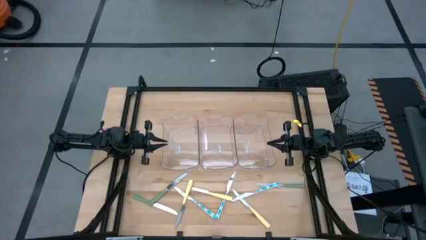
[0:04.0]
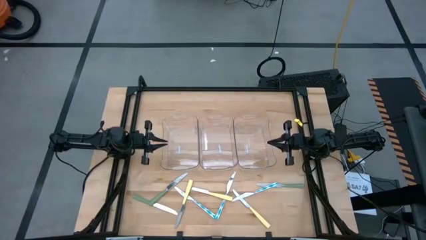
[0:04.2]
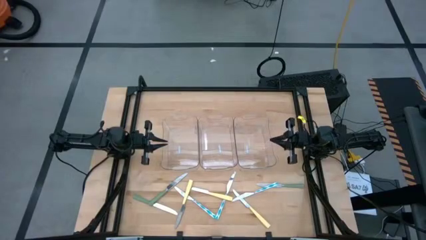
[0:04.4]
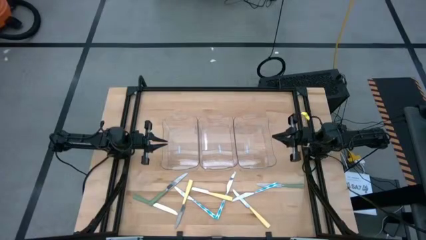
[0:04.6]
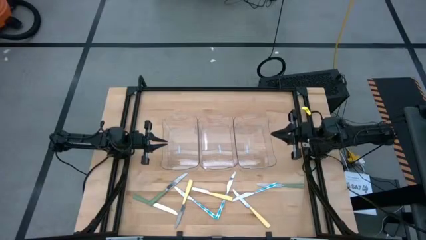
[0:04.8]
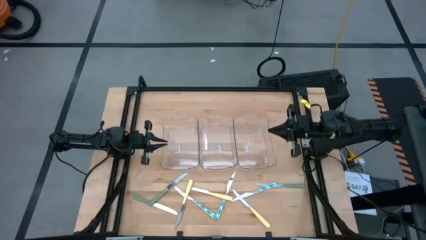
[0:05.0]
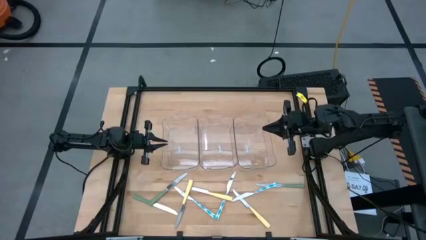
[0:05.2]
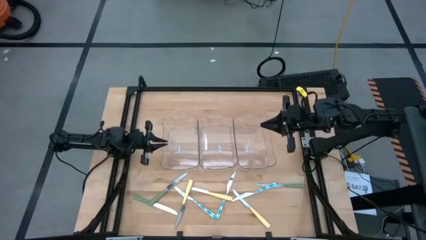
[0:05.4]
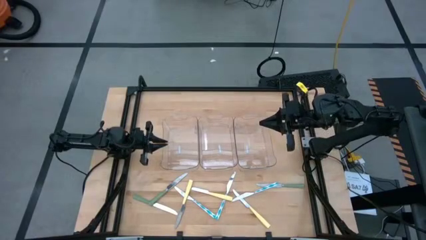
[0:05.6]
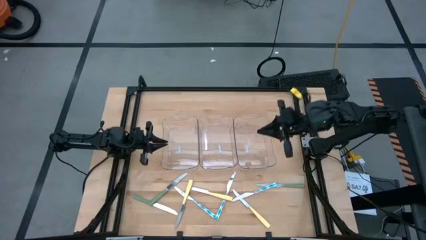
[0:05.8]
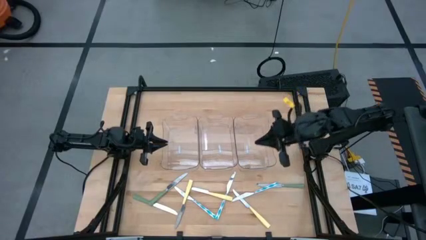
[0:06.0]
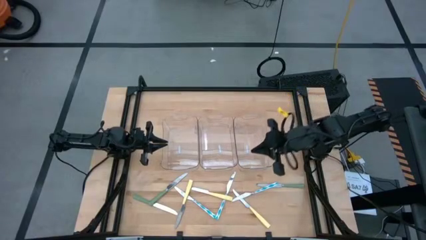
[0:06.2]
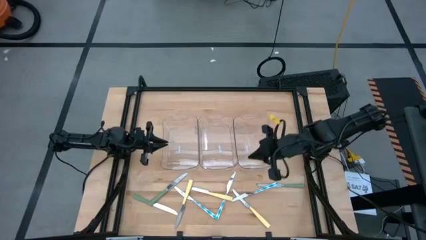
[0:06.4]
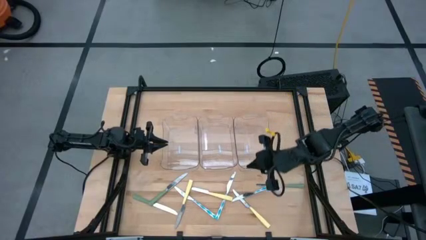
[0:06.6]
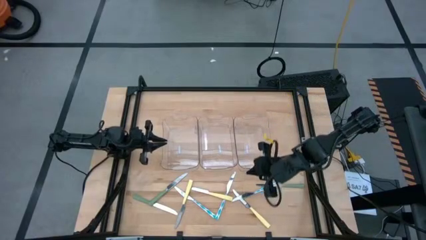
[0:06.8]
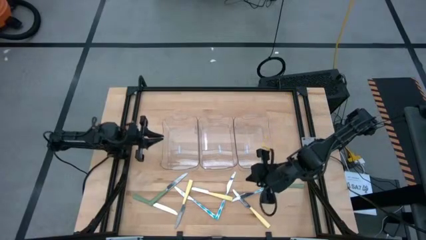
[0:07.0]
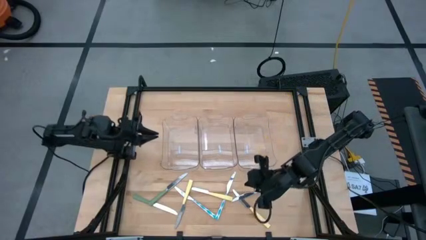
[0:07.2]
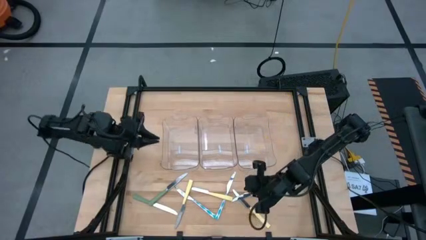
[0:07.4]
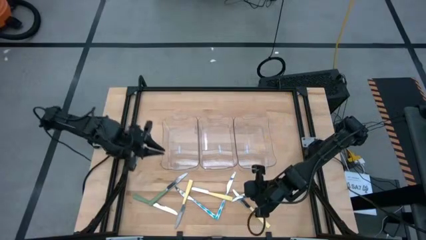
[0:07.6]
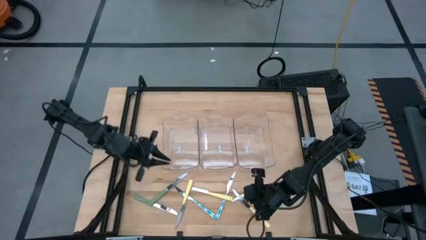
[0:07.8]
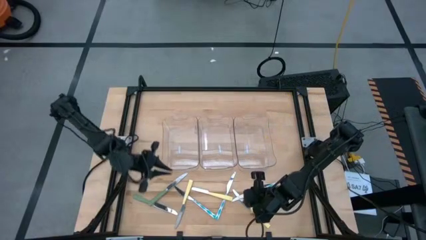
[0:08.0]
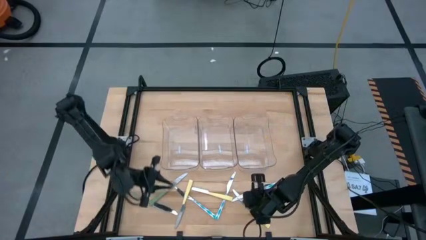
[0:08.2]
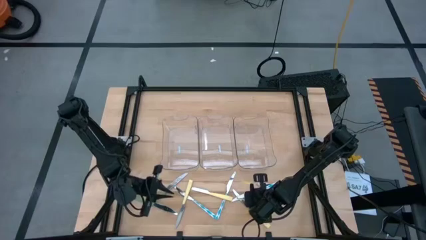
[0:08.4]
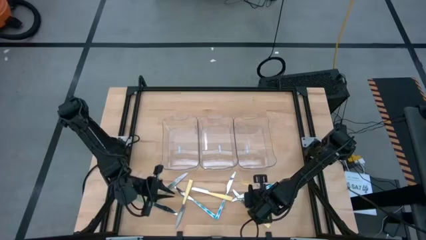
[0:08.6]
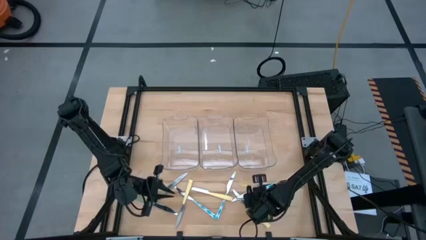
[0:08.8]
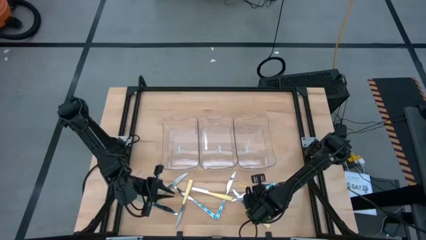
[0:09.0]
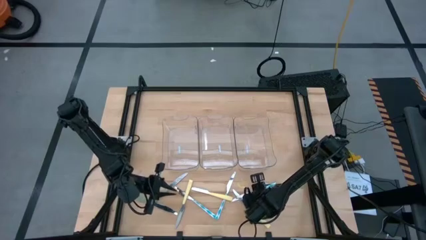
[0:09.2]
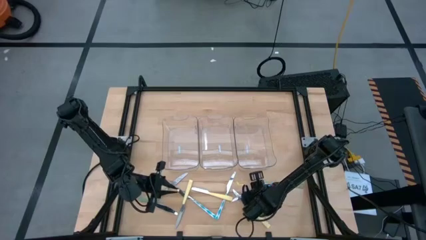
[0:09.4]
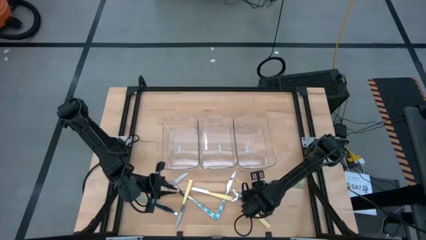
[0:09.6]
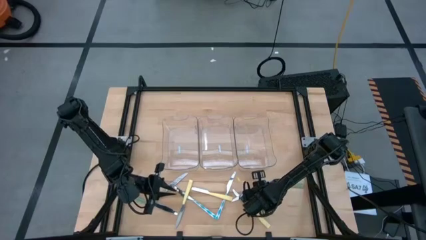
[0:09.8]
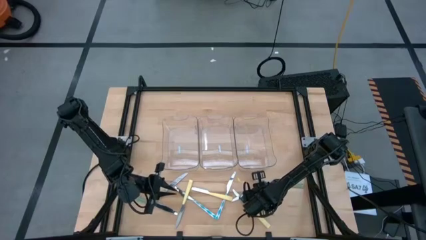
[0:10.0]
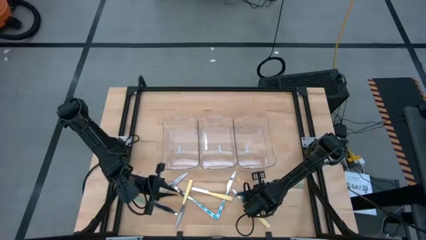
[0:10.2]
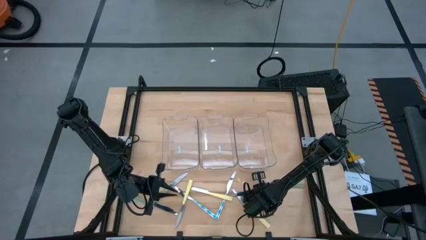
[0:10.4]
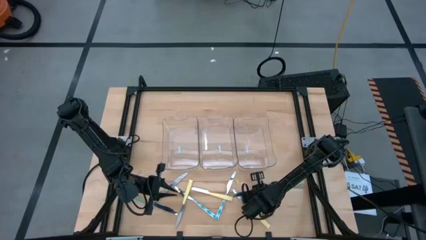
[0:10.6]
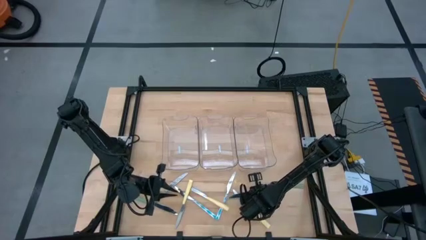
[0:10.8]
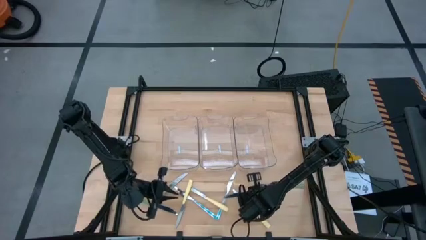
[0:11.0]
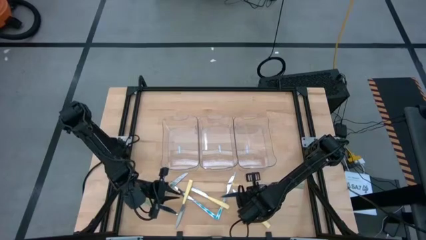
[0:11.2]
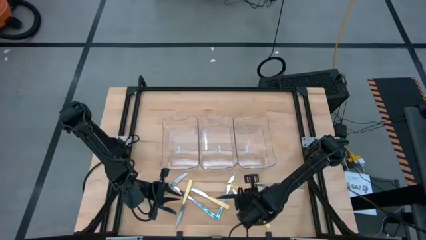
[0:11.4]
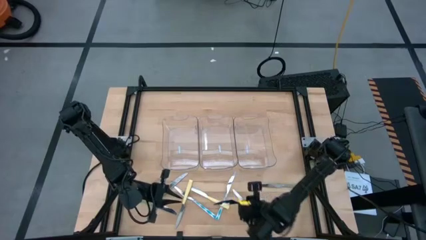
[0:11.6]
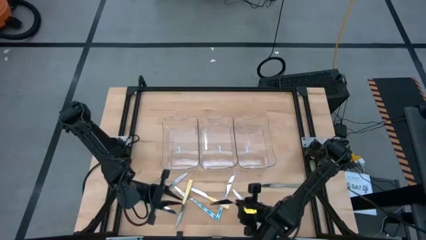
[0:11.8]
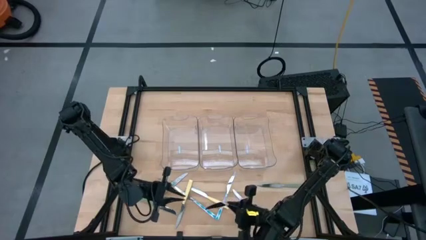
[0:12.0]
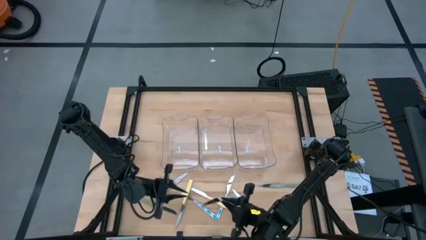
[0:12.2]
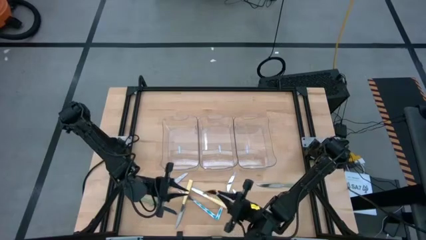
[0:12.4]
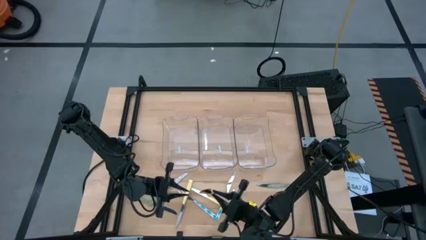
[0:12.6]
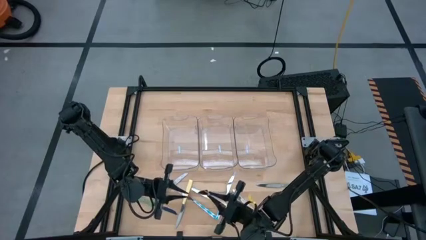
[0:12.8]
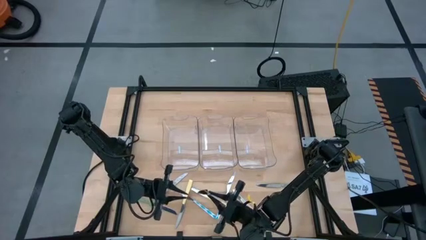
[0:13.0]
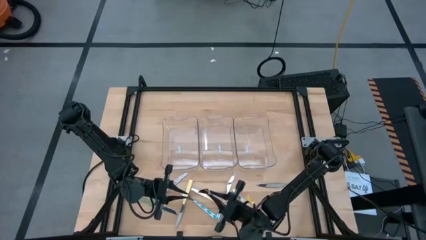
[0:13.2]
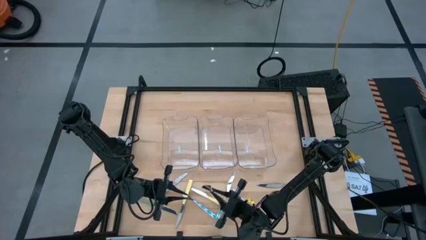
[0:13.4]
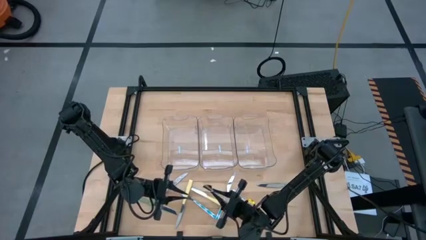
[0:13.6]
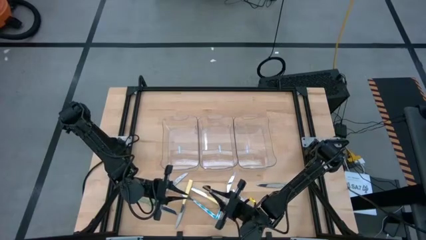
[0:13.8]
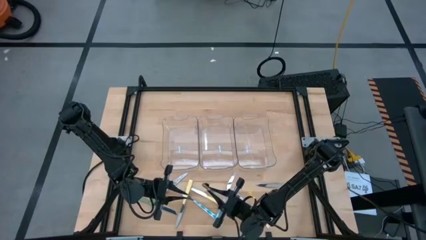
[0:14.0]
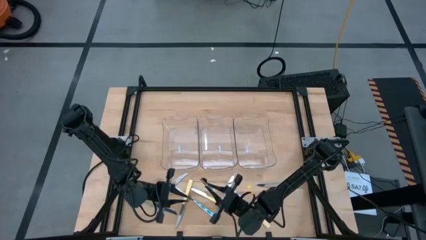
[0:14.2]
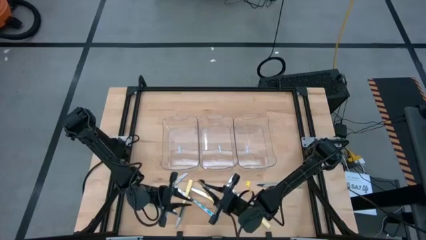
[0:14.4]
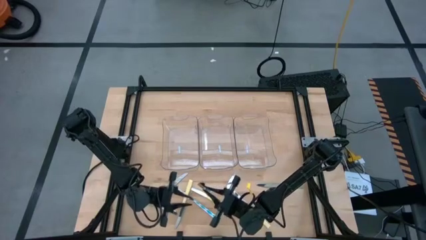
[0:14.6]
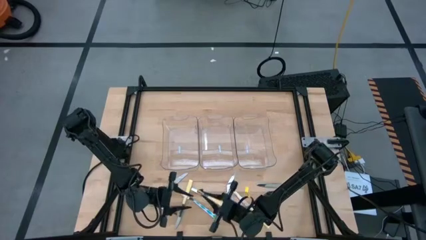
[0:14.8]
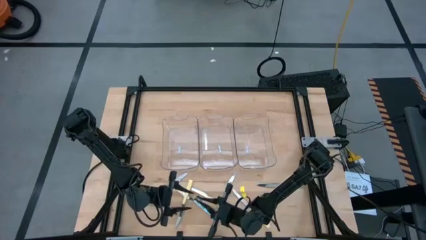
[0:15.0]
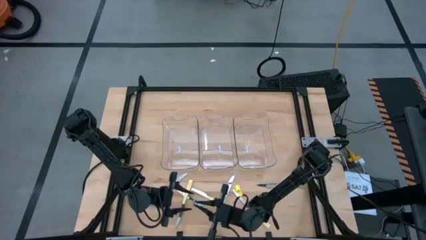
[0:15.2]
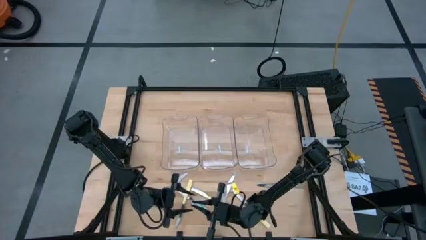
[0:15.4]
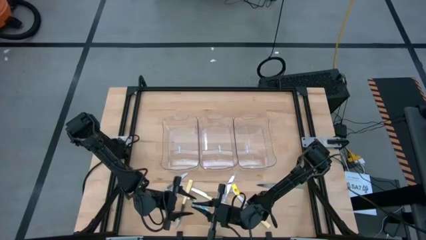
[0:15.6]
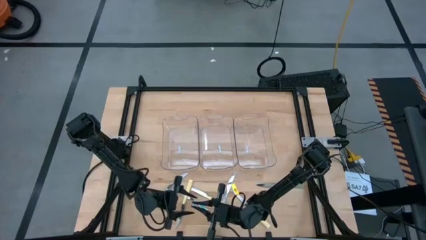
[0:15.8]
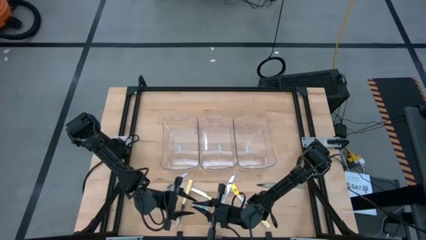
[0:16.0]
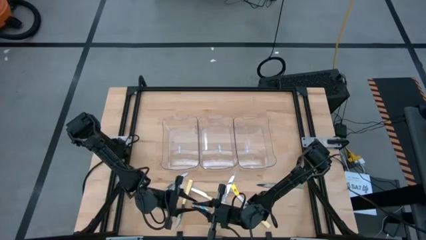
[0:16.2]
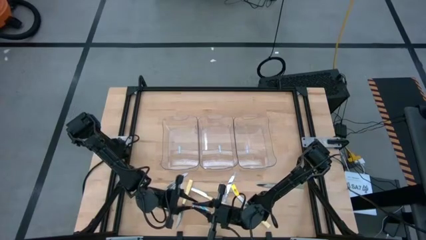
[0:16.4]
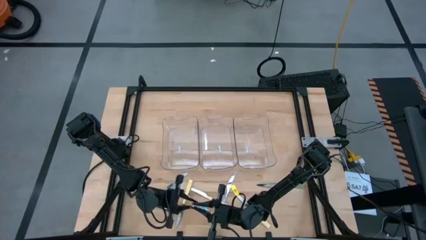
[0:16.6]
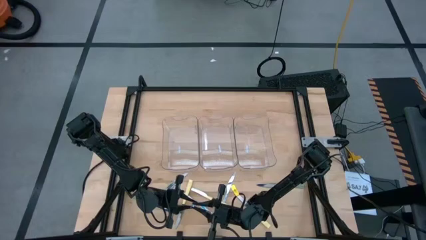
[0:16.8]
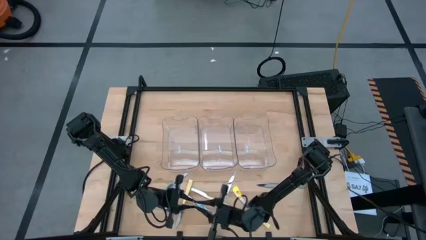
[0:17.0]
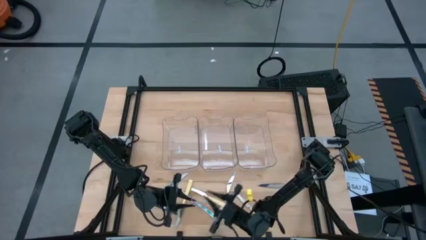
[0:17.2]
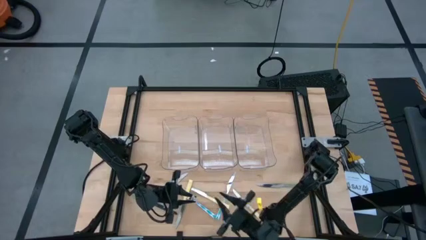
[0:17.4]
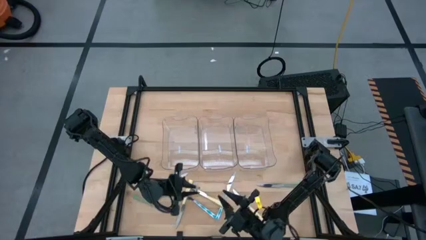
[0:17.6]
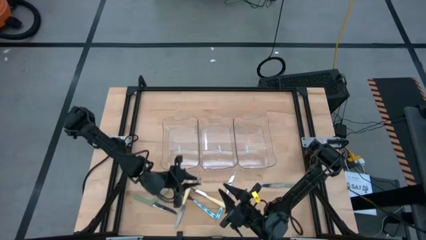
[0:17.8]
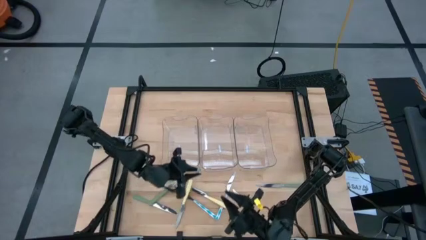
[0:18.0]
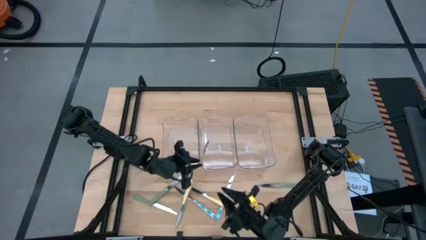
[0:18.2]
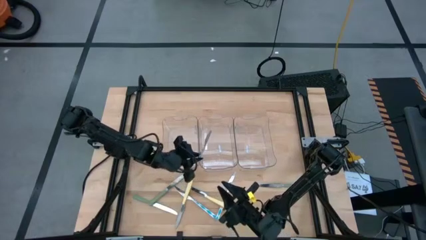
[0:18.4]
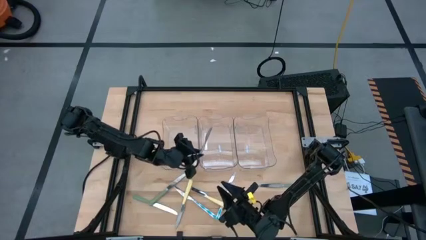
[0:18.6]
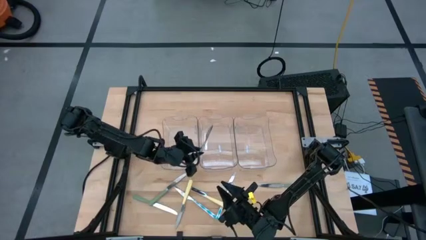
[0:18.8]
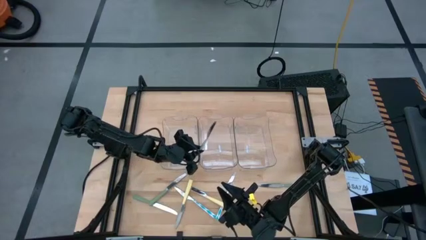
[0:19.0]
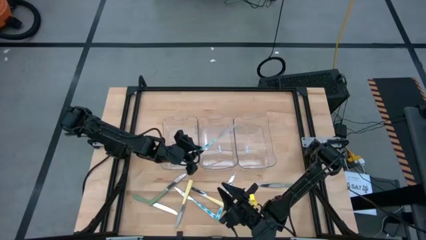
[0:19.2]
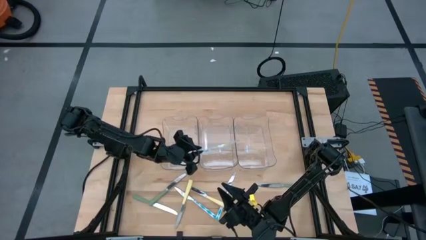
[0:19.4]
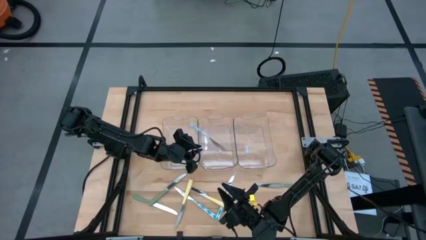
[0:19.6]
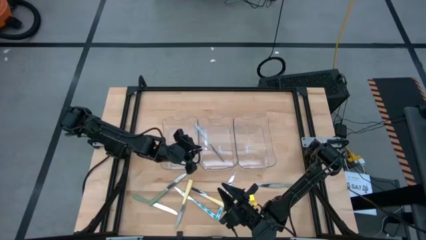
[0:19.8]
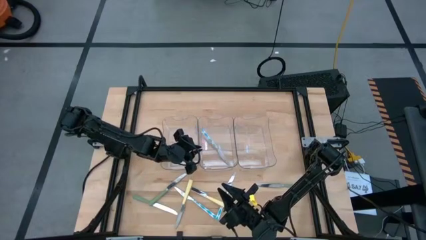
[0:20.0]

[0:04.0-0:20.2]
Task: Sort silverware by color (type)
Put the right blue knife into the middle transparent bin
